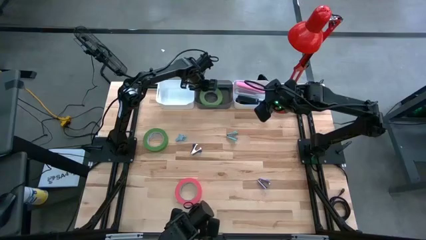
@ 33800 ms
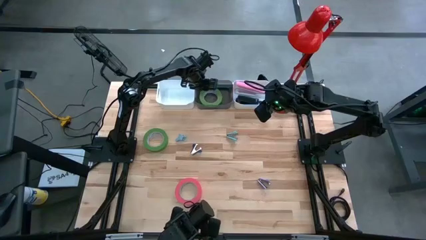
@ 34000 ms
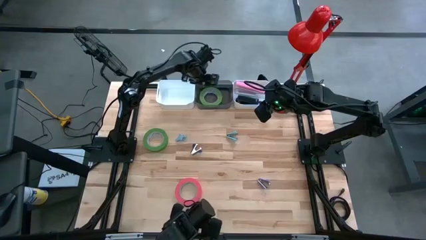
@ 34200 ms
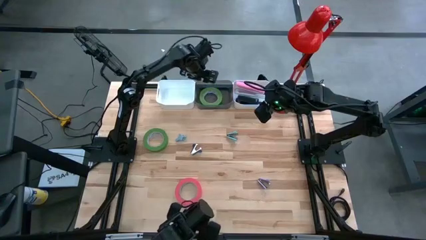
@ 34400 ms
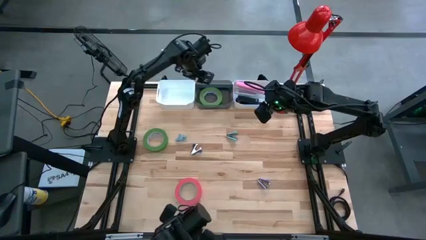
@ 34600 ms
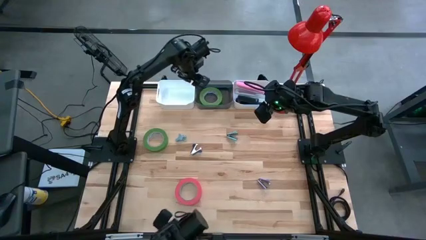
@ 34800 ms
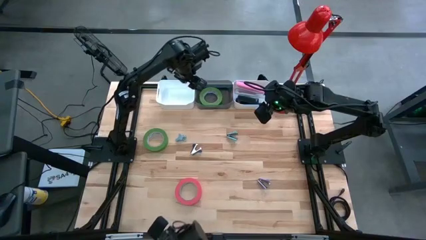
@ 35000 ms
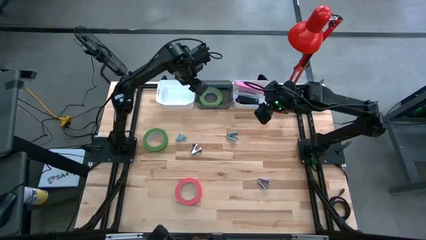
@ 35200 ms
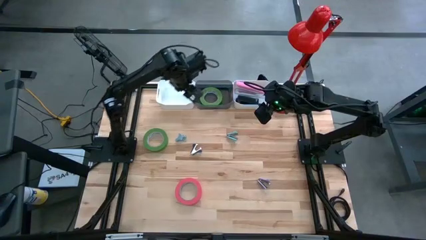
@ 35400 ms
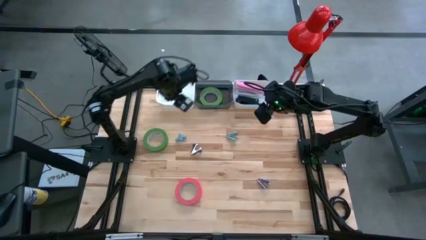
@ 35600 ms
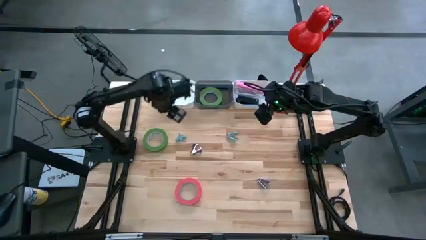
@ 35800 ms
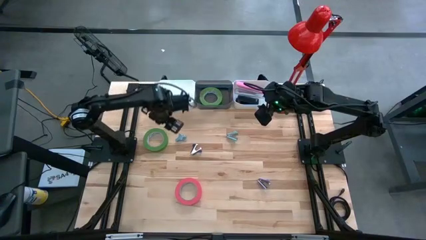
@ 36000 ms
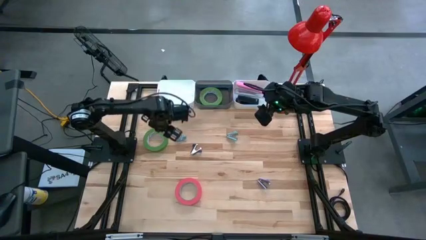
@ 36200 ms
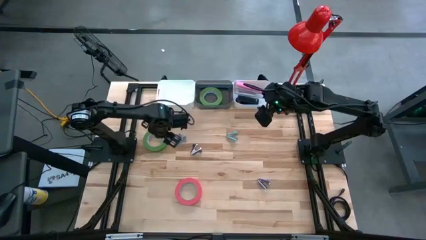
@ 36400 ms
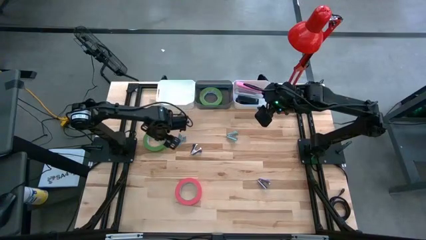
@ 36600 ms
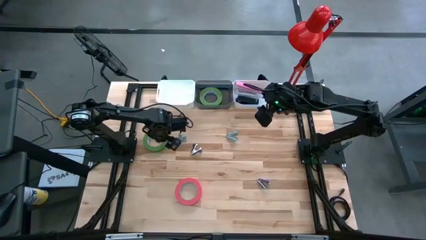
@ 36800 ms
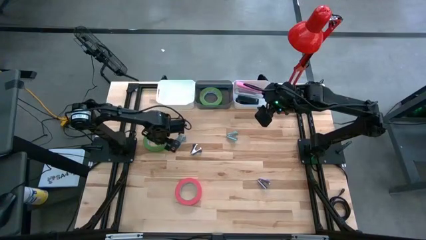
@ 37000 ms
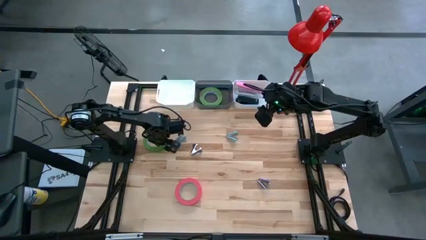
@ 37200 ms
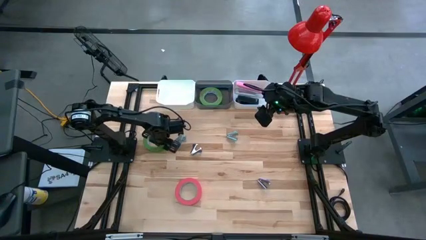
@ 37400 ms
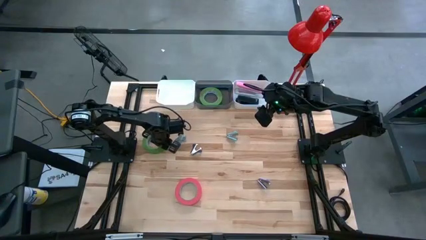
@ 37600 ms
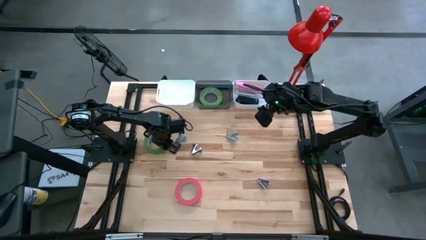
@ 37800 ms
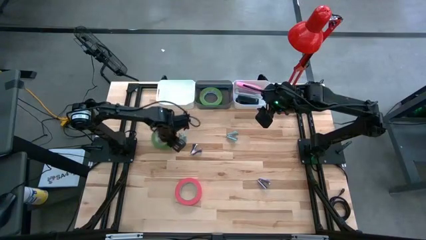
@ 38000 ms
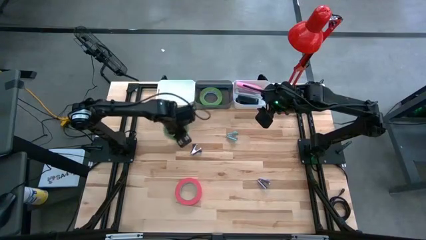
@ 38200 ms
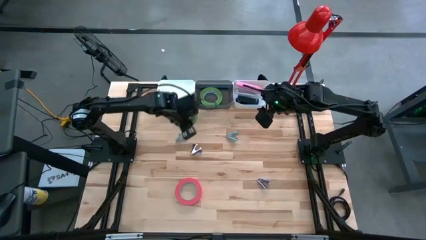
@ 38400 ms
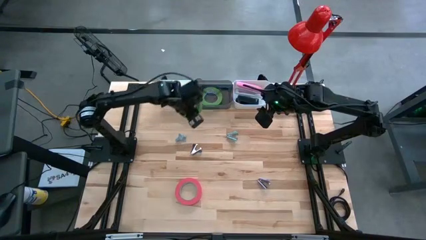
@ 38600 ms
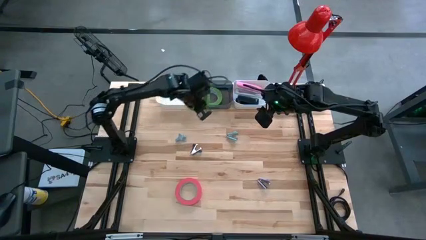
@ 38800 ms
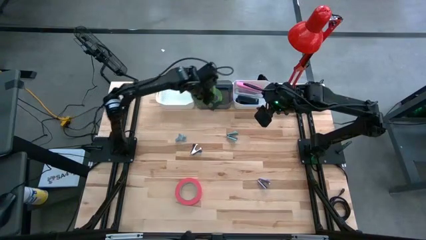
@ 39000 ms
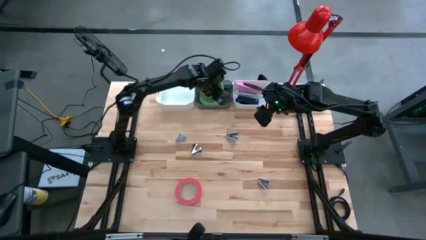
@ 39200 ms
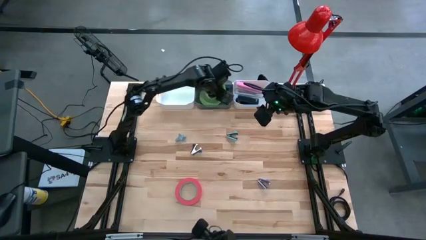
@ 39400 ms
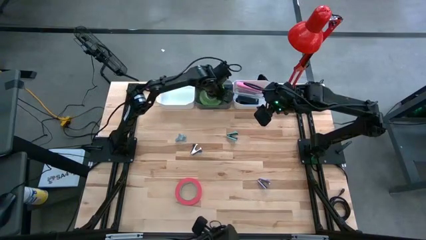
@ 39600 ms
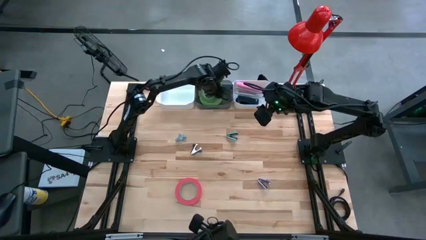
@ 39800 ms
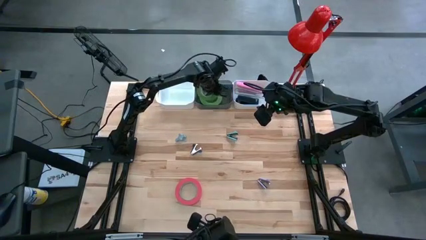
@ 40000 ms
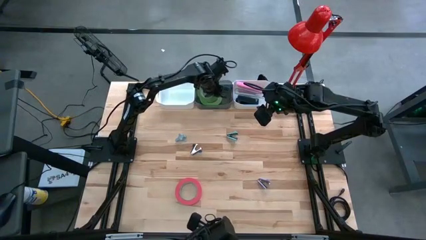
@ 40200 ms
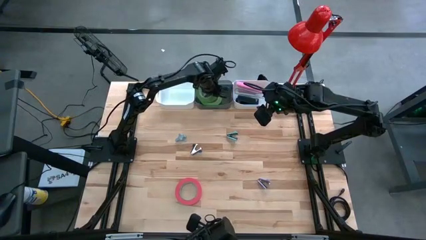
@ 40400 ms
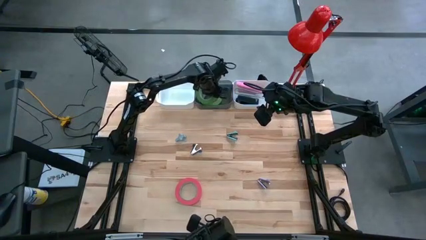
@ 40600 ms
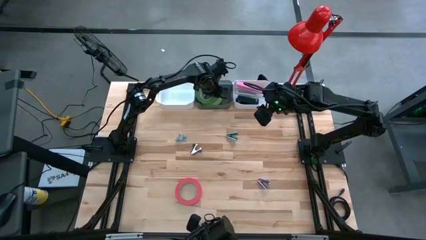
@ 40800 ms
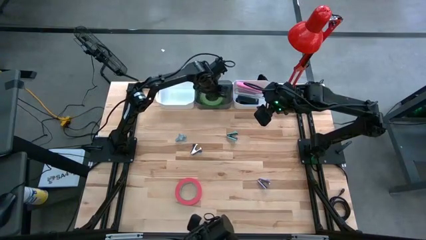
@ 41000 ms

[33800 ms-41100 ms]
Task: Pick and place Stapler, Stapler remover, tape
Put the green tape into the black bin

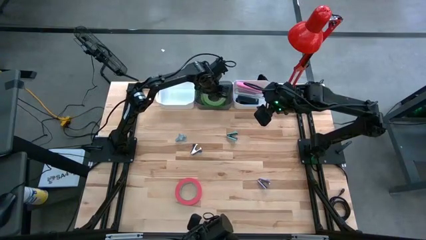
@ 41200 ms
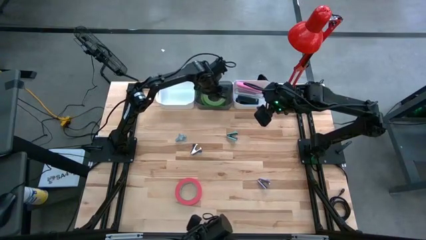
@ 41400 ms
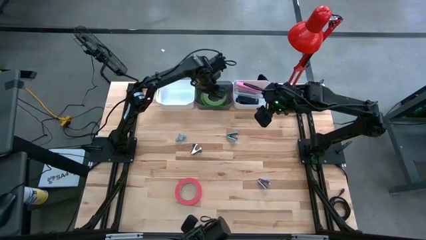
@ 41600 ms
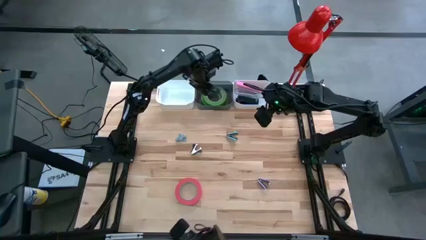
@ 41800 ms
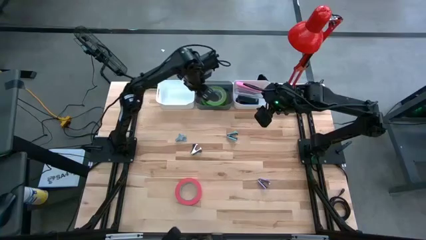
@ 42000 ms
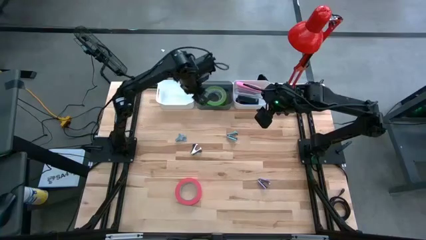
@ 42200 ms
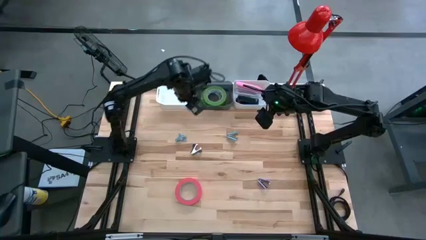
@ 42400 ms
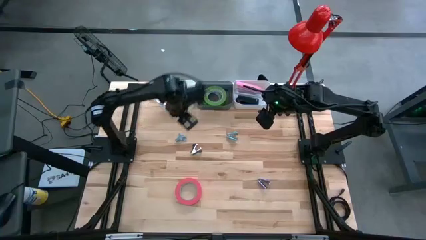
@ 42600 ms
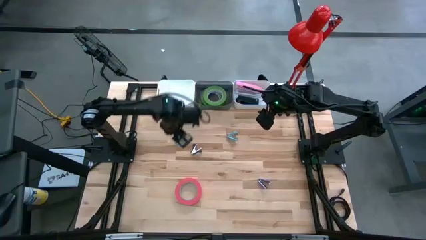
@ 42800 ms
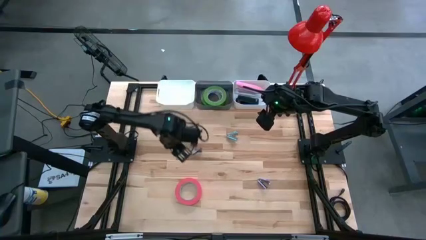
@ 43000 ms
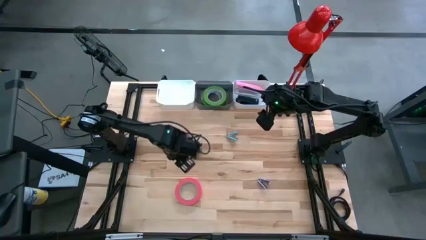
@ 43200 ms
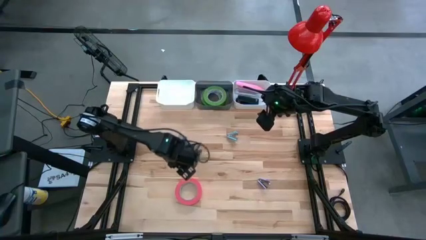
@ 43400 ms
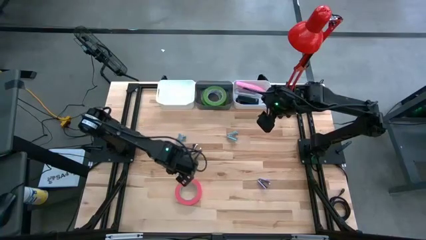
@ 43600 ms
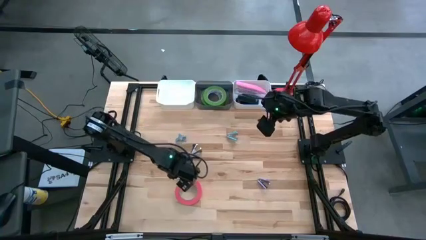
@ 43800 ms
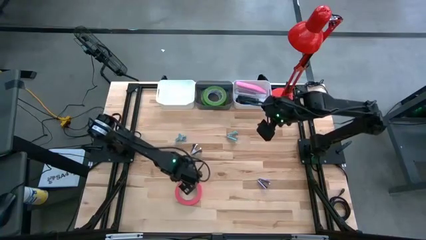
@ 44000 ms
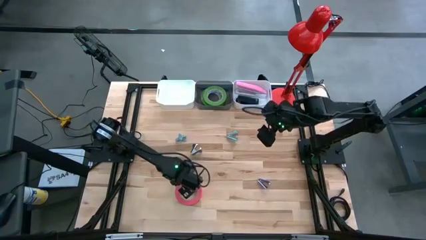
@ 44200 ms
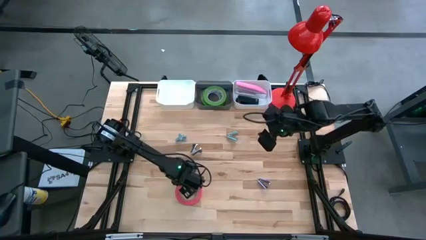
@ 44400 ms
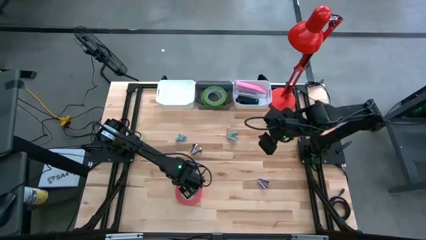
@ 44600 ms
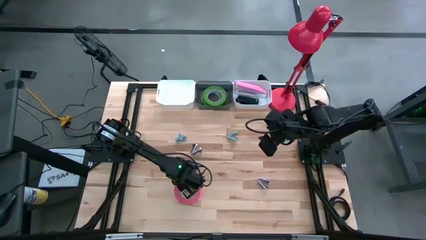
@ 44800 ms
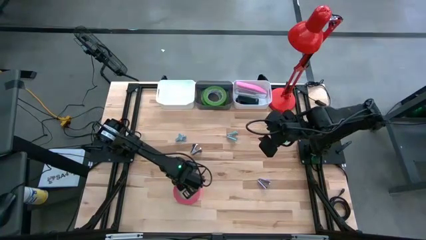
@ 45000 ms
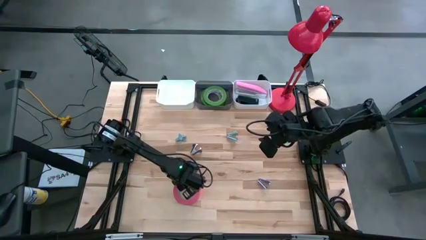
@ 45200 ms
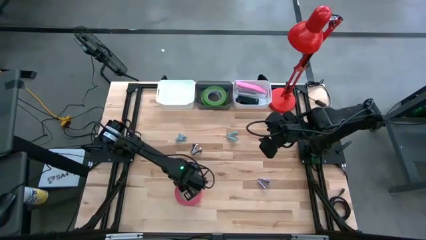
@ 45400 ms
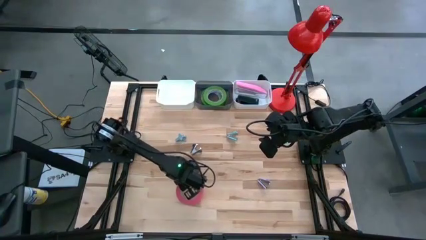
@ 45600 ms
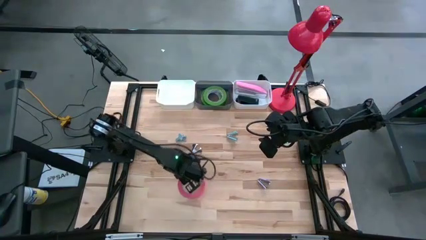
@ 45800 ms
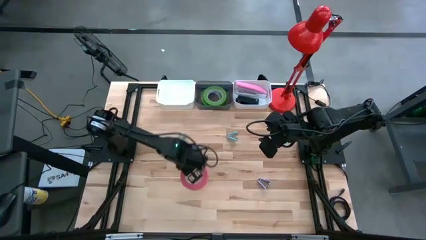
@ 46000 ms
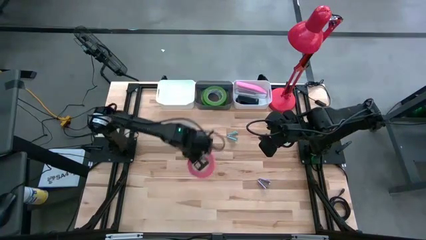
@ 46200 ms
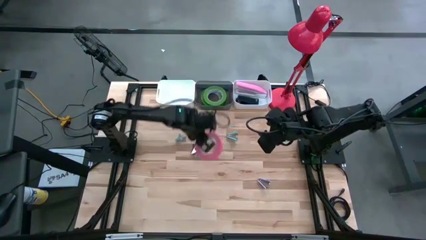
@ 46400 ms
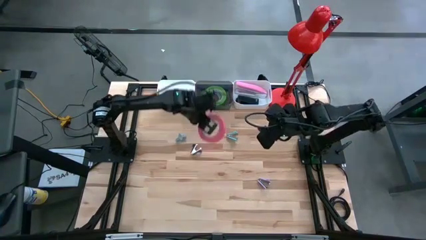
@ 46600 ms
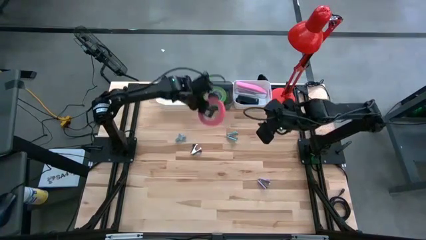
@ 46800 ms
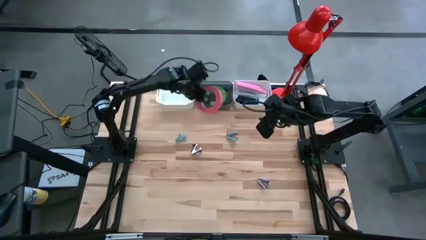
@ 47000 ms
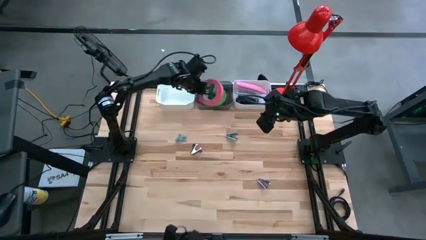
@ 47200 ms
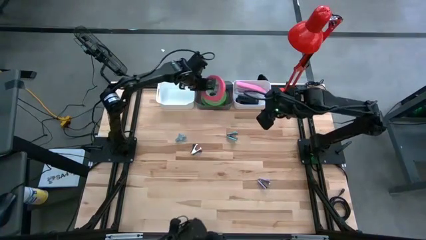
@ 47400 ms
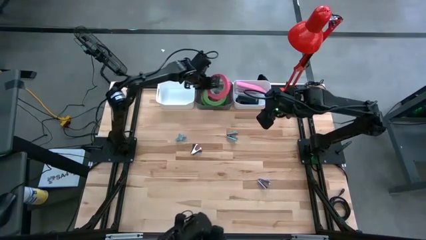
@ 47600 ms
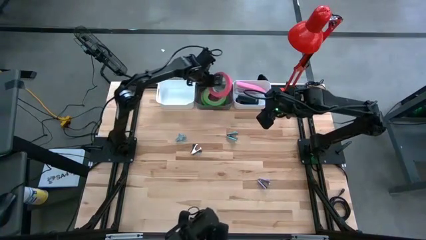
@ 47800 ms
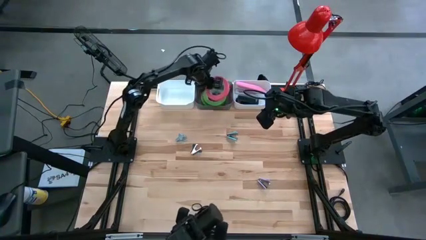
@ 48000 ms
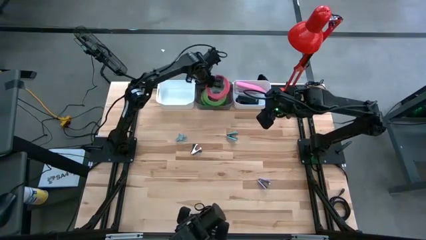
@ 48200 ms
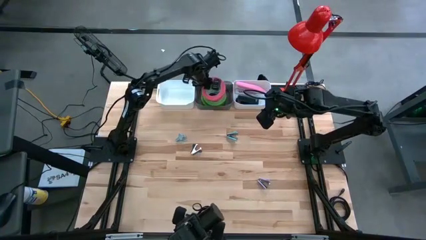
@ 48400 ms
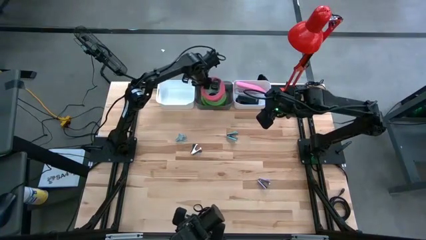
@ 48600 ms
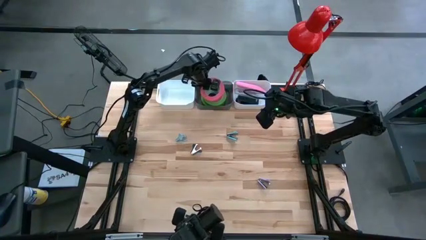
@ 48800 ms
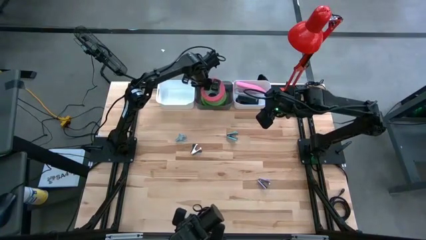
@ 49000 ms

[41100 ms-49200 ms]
Put the pink tape into the black bin
